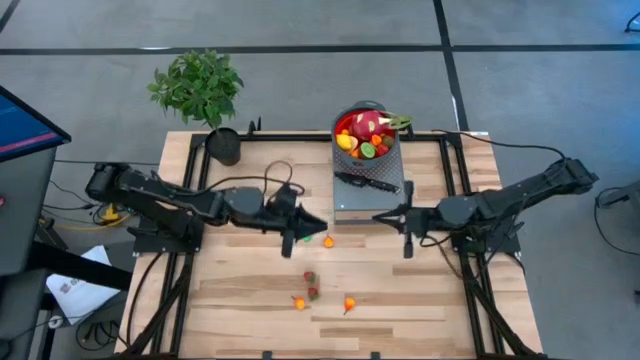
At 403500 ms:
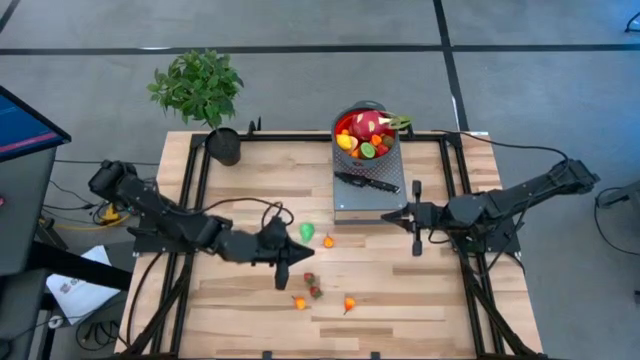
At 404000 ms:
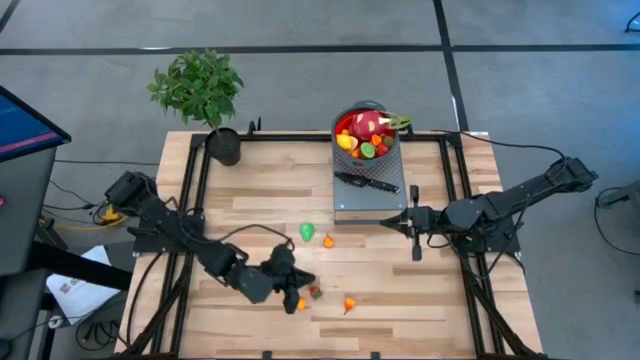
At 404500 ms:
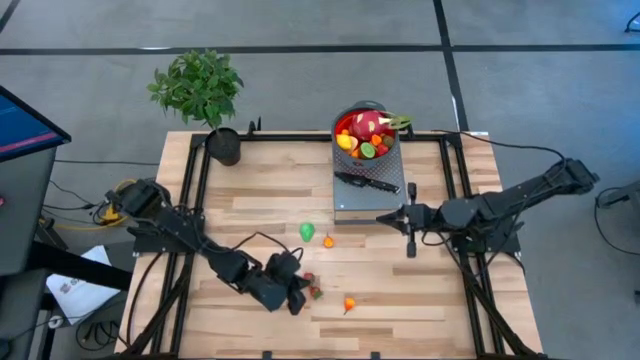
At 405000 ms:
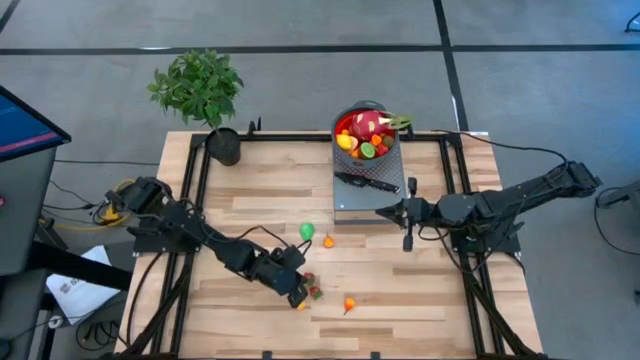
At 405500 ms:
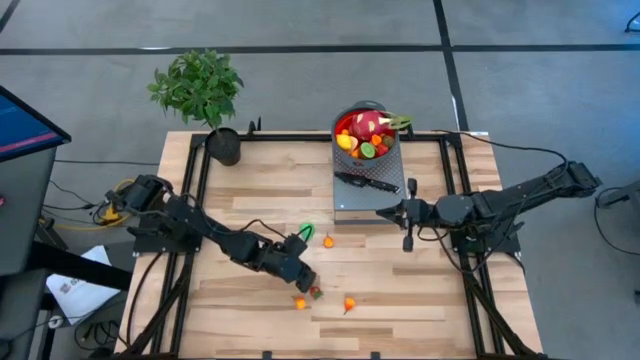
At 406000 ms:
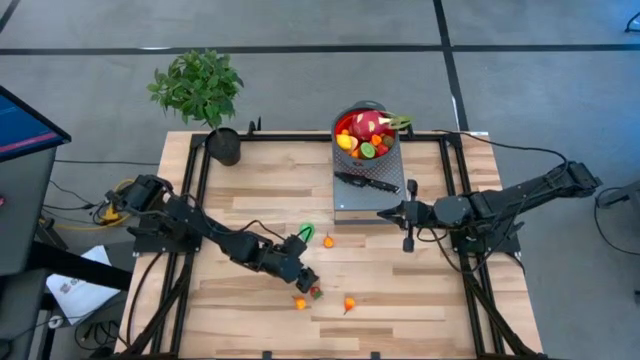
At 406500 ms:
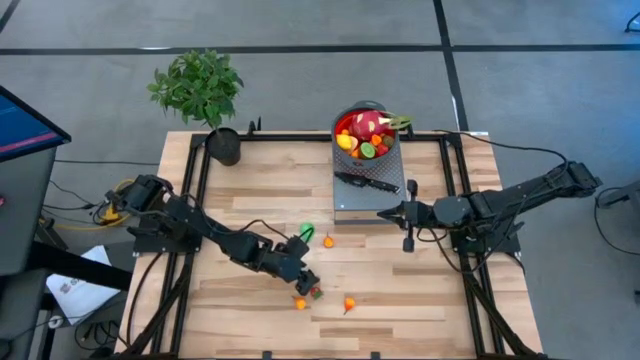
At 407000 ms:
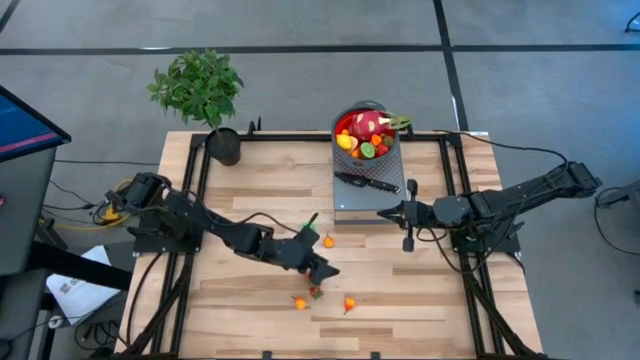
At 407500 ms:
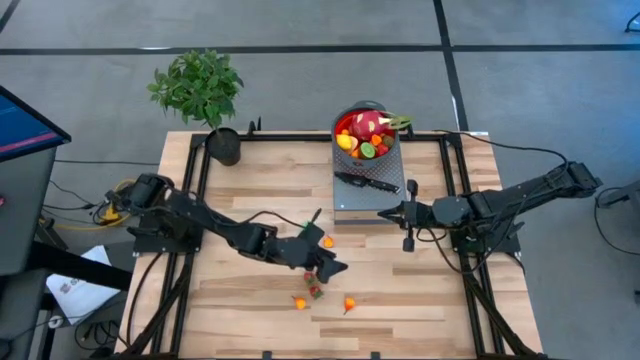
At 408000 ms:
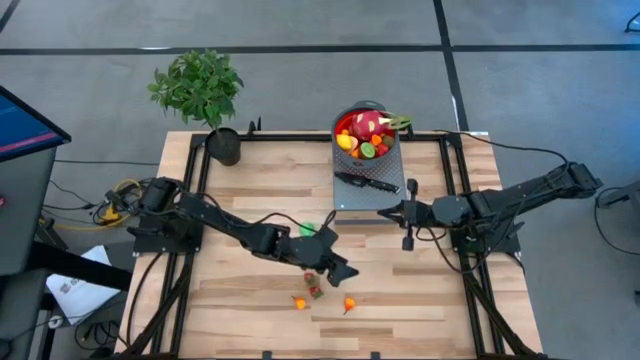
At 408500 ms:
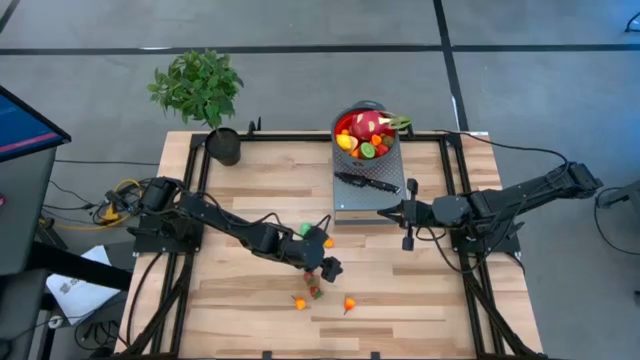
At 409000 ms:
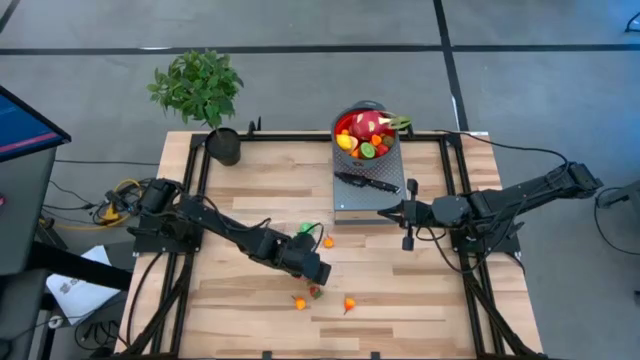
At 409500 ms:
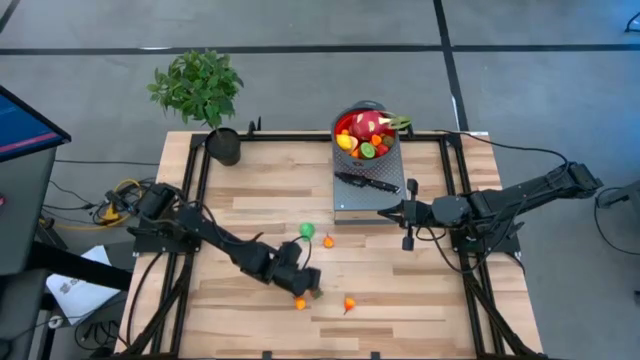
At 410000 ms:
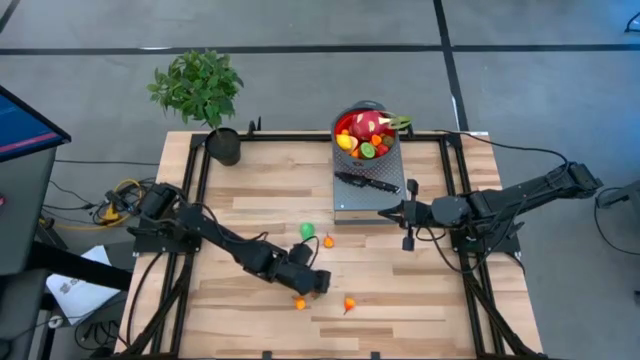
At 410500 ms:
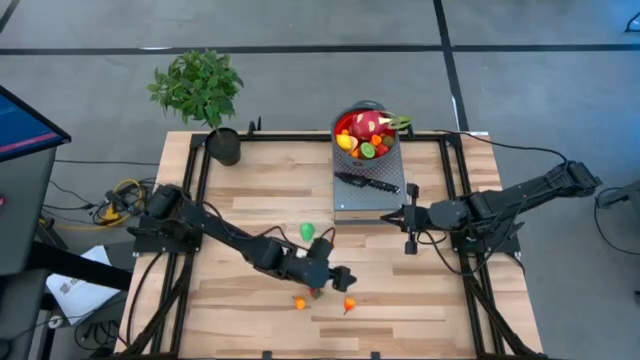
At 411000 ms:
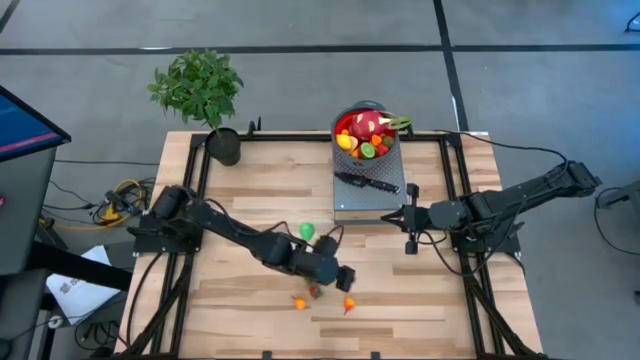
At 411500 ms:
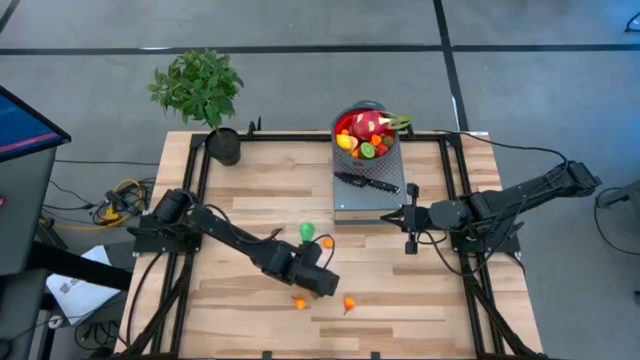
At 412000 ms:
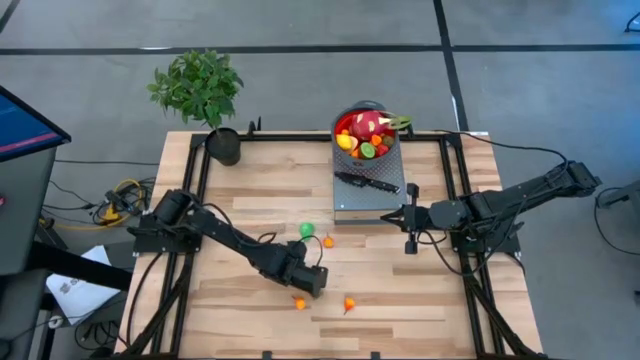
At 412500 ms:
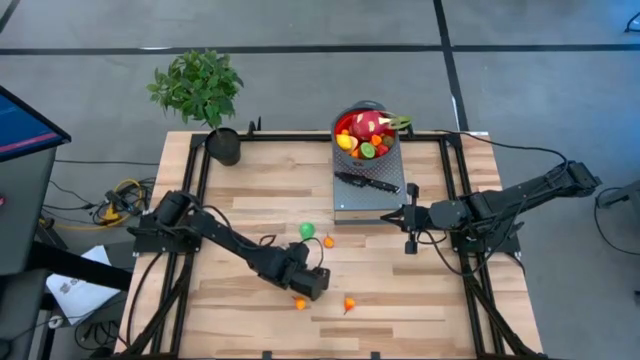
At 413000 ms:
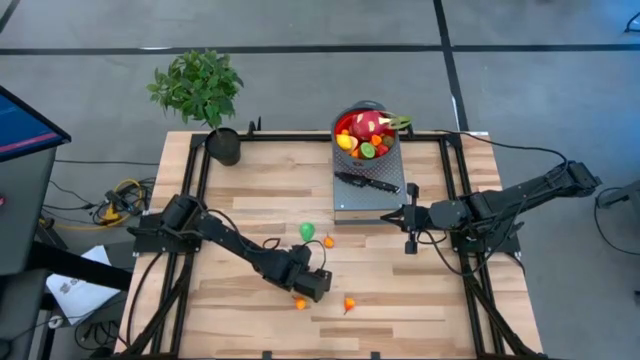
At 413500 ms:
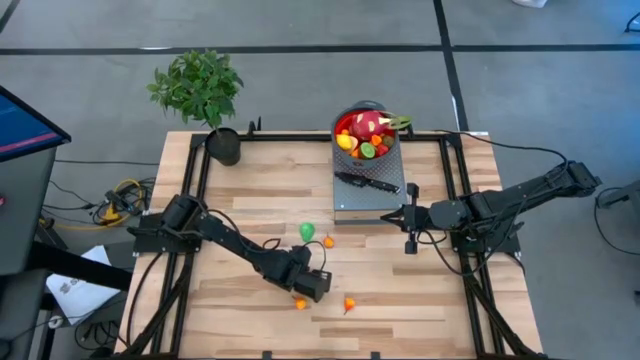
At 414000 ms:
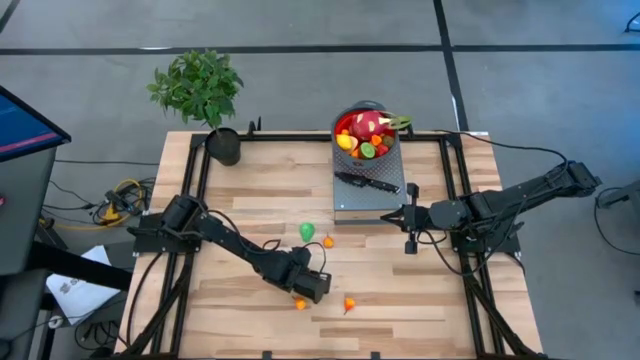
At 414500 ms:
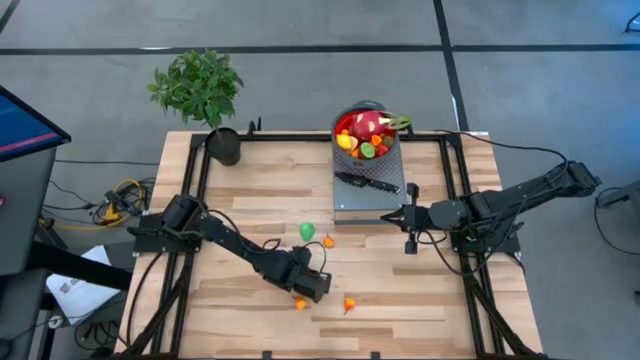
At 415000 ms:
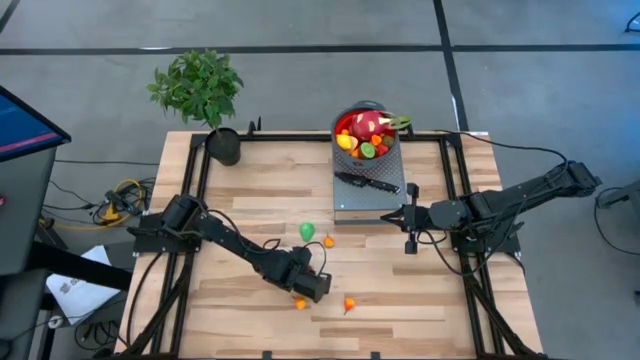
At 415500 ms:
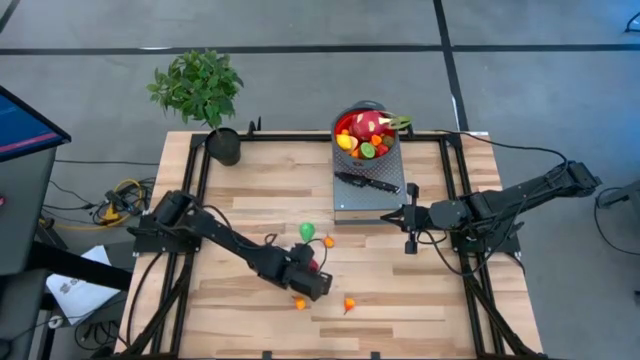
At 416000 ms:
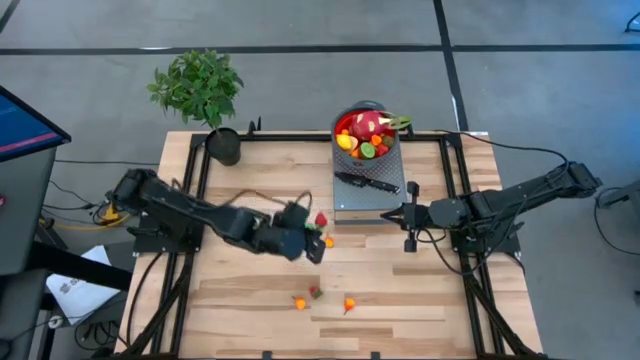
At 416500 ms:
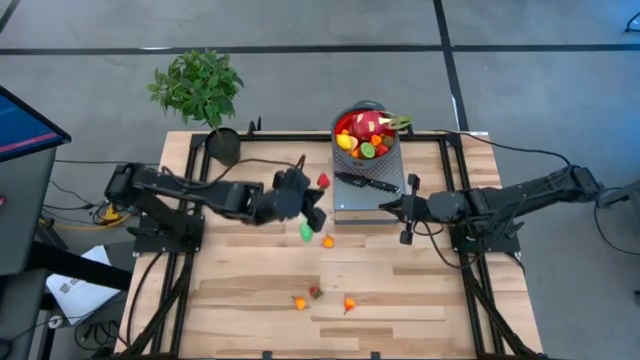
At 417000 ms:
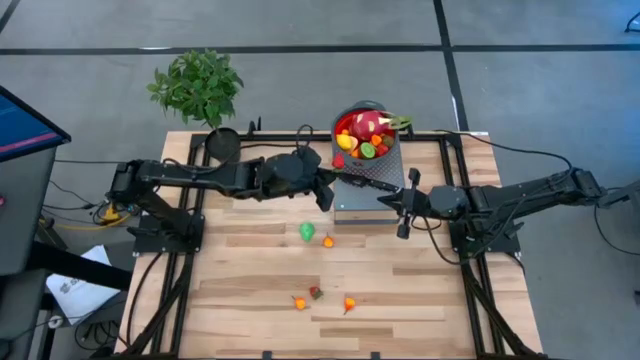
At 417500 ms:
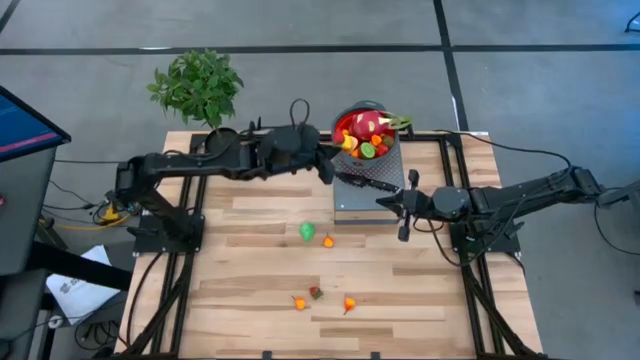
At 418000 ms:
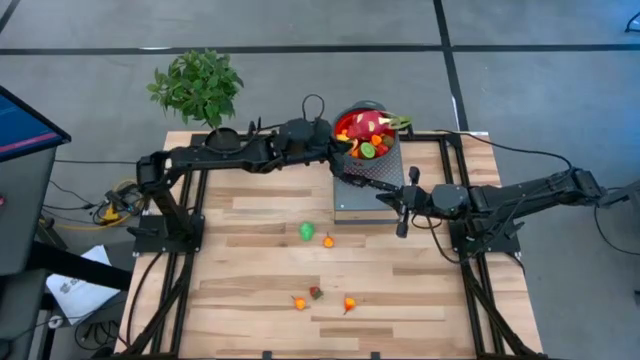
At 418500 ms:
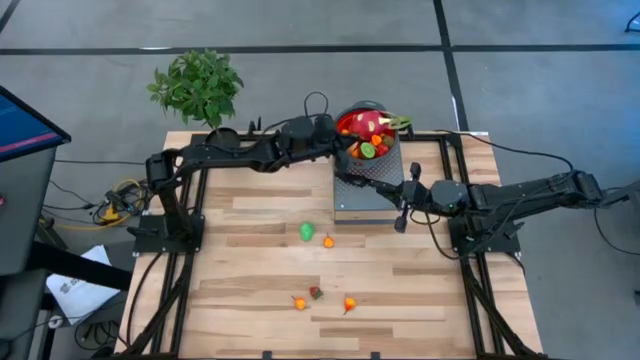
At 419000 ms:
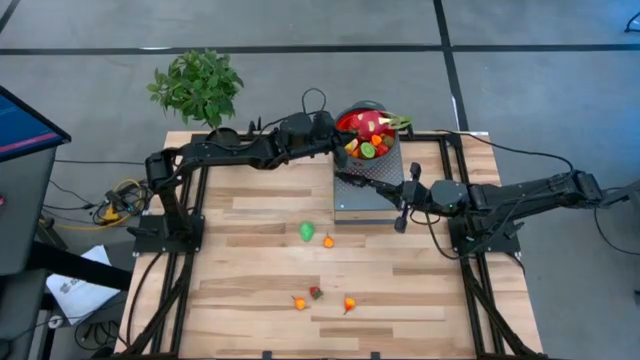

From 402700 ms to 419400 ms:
Task: Pick & Place Fruit
Put the strawberry into the red colander on the shelf

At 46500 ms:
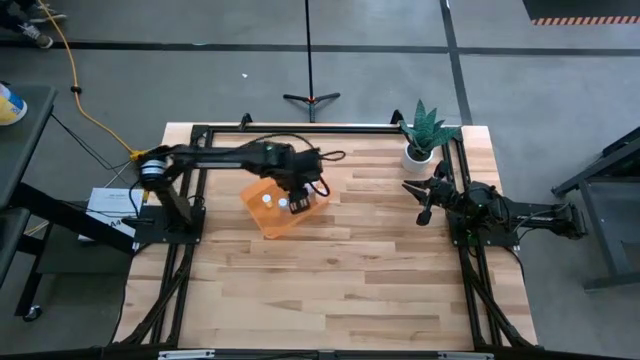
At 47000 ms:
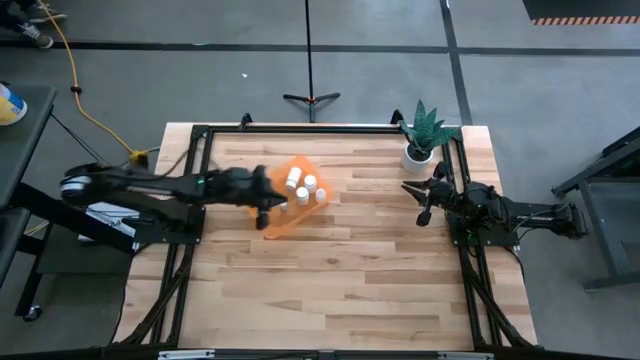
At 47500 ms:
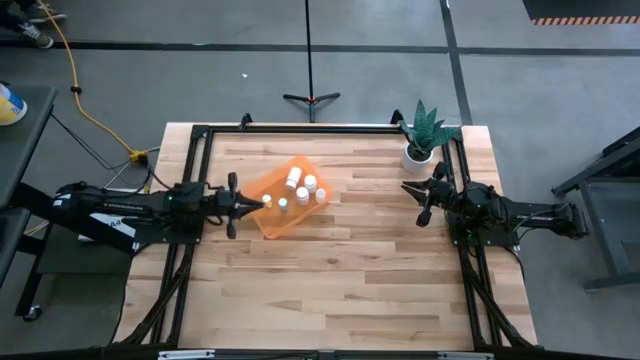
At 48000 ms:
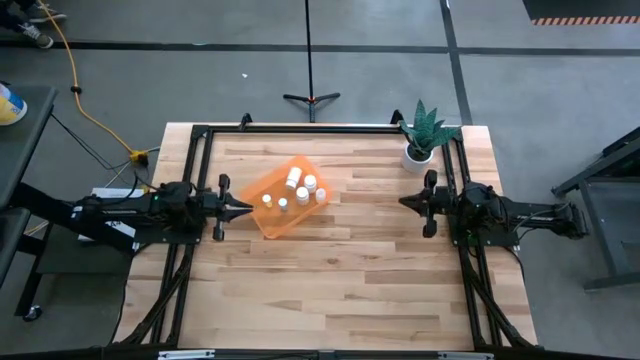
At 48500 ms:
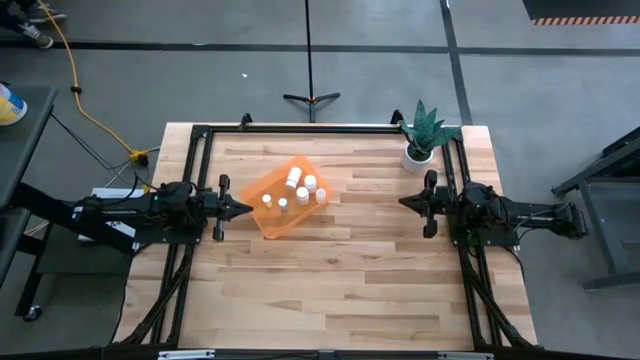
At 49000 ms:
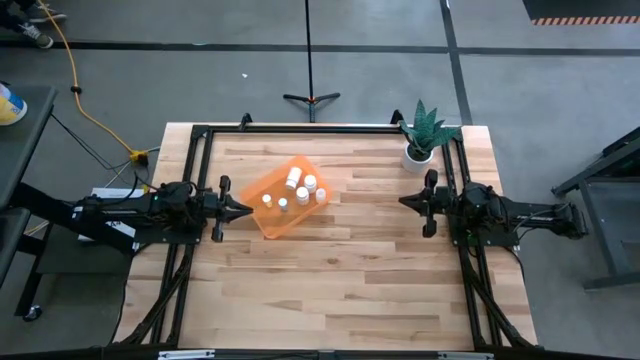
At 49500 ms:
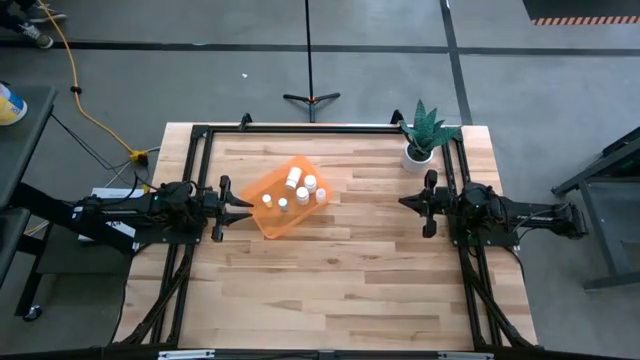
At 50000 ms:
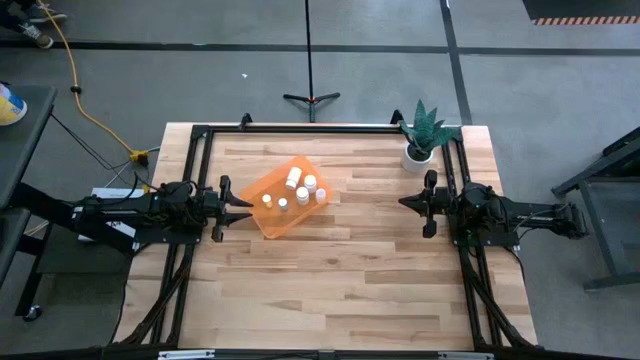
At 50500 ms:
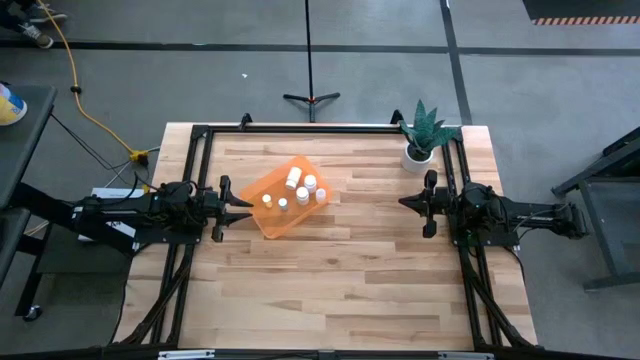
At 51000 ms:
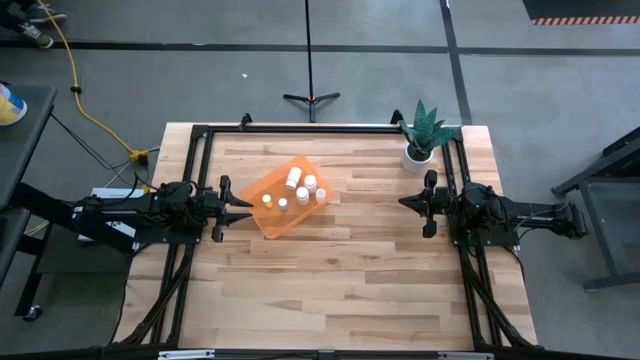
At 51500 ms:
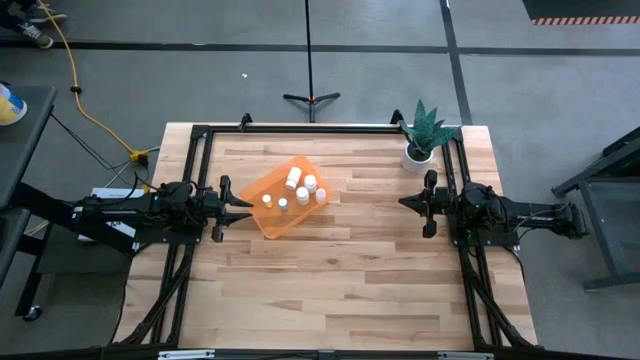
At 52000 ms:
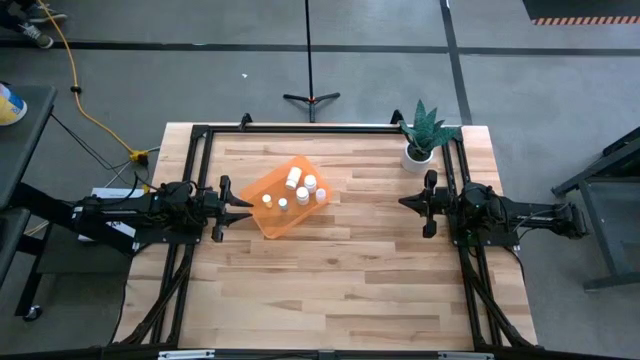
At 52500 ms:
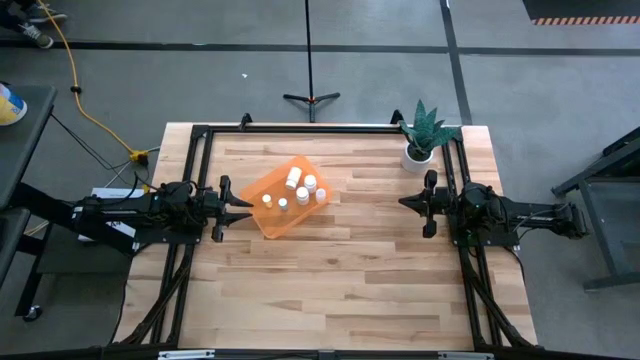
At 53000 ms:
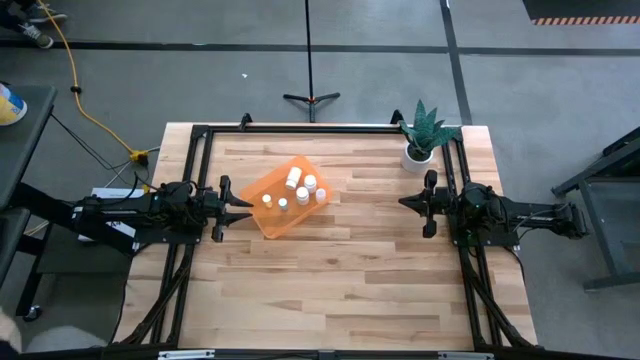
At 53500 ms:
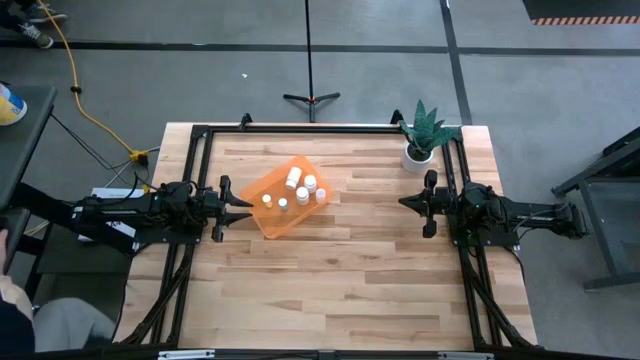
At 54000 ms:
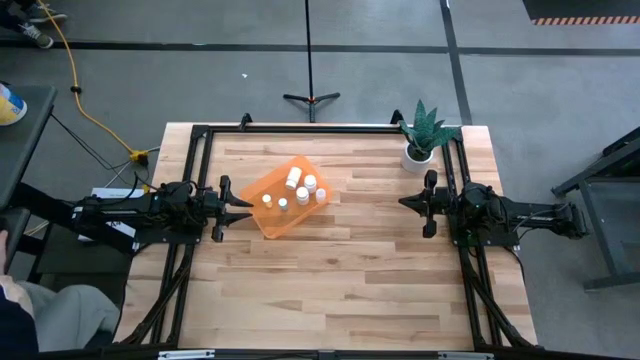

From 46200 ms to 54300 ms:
Task: Pick and place pill bottles into a basket
Return to Home Position
